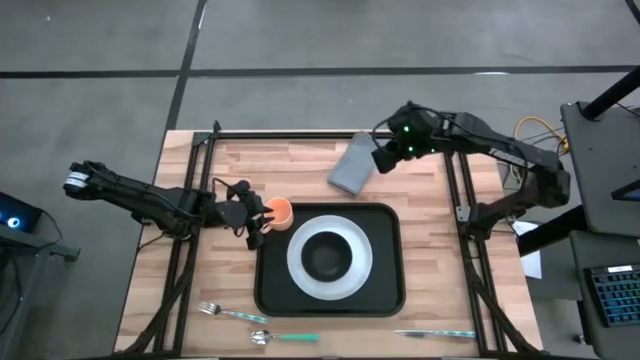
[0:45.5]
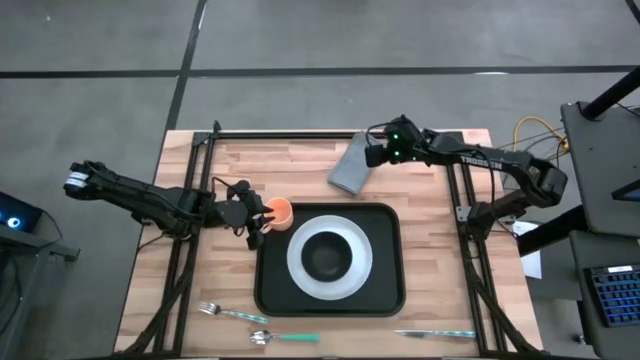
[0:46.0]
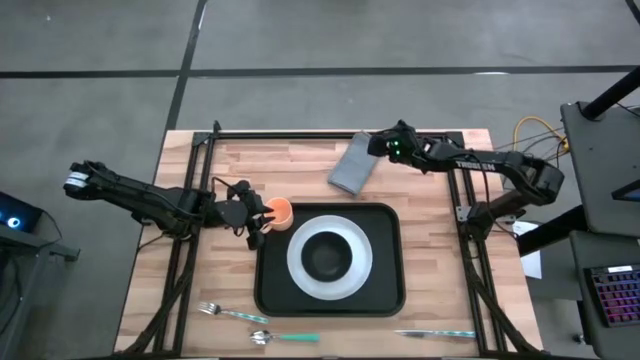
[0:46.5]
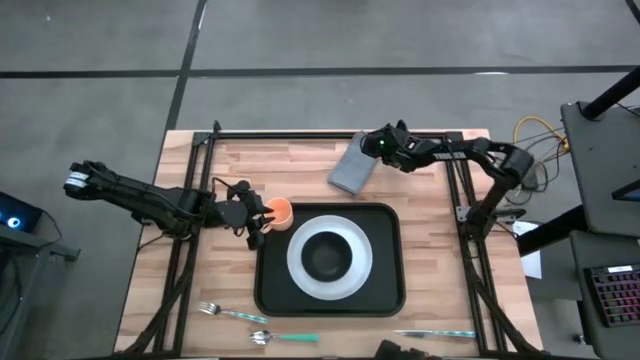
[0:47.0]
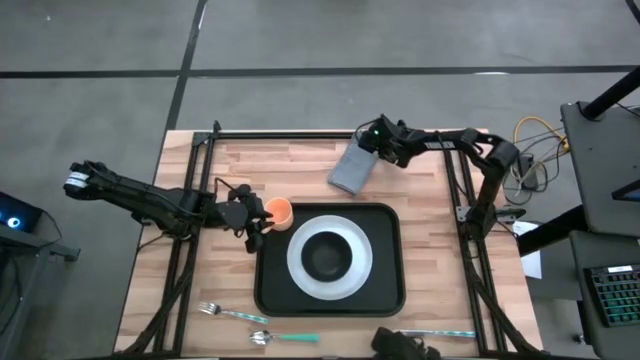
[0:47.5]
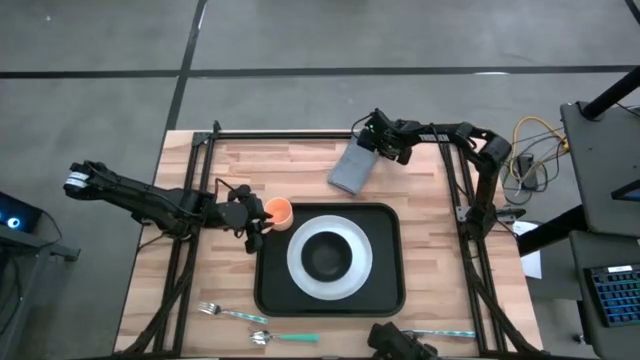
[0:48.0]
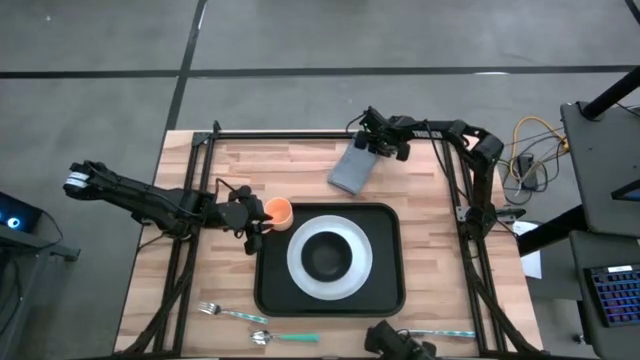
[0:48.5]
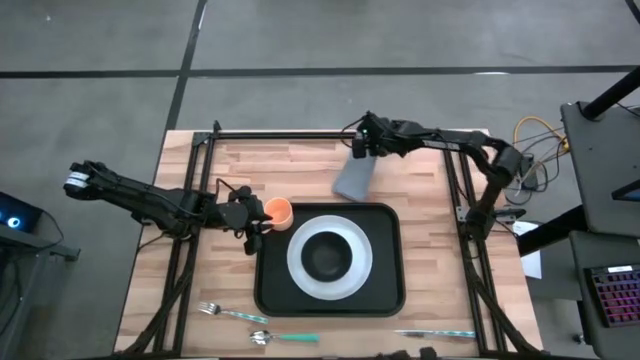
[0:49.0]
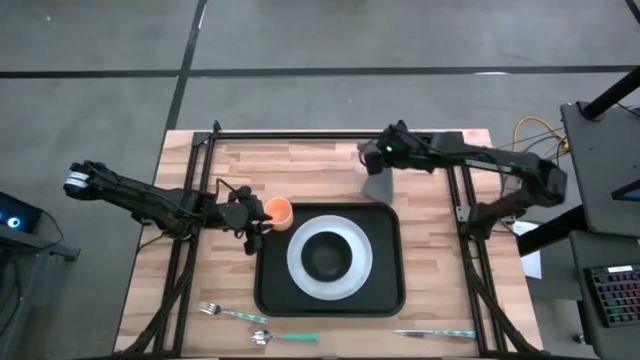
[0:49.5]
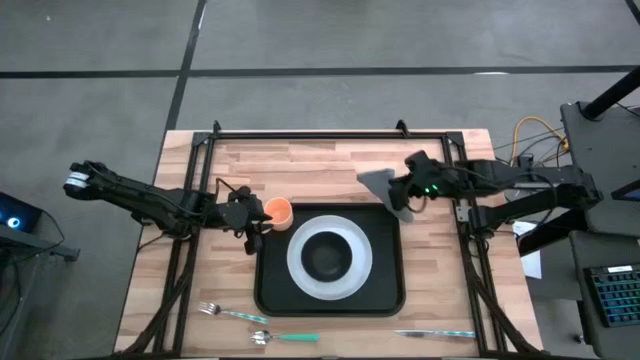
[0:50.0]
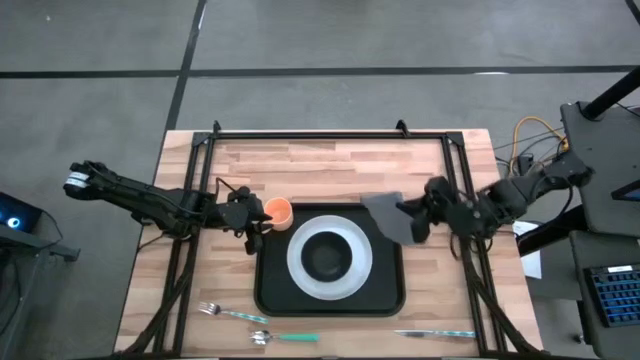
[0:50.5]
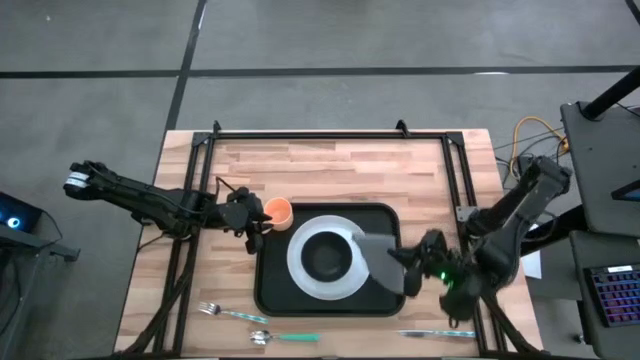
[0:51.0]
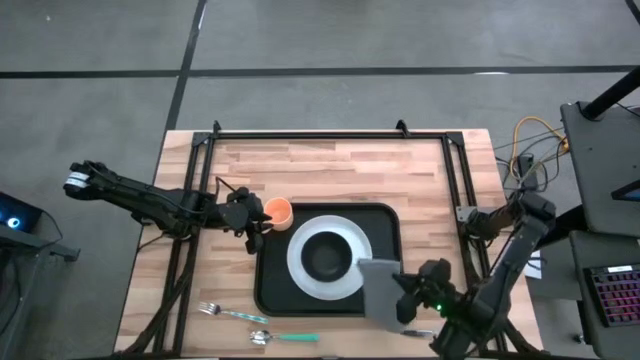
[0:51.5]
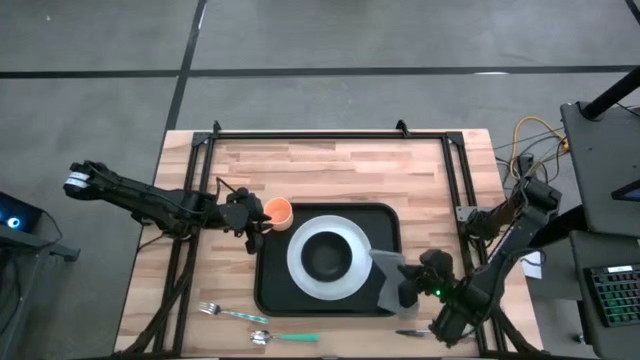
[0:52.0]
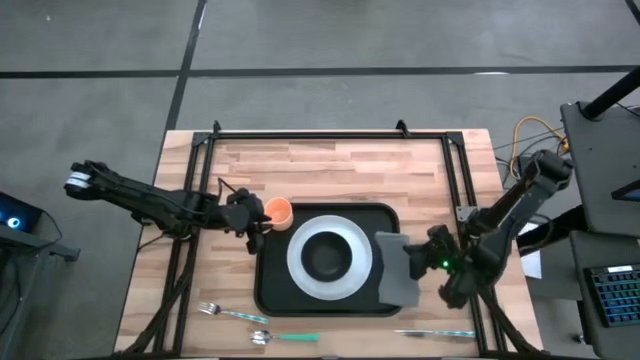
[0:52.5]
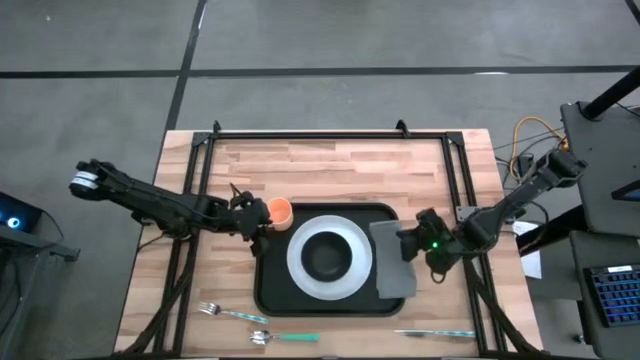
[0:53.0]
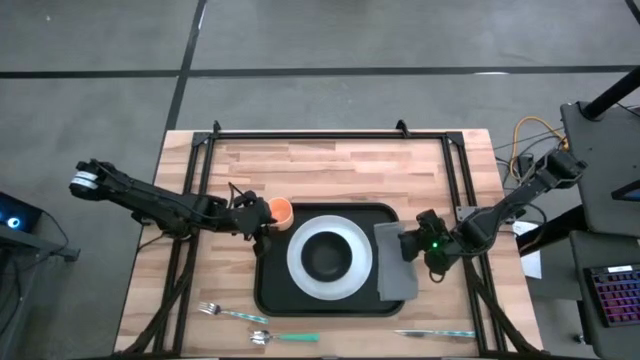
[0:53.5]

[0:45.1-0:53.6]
Task: Set up tray
Put the gray table napkin to the right of the white plate on the black serving tray

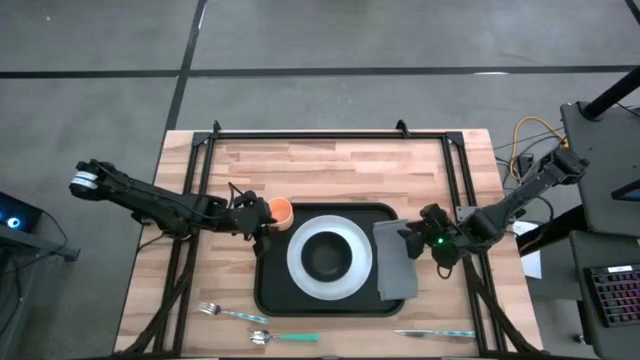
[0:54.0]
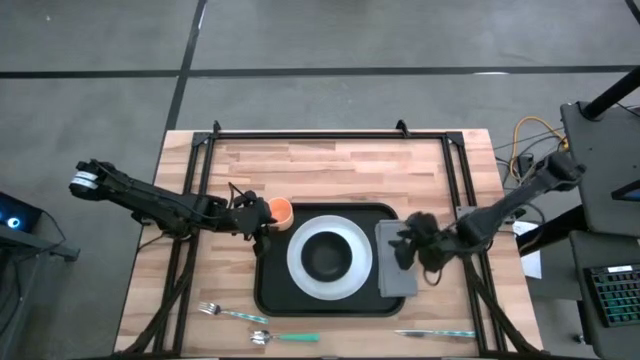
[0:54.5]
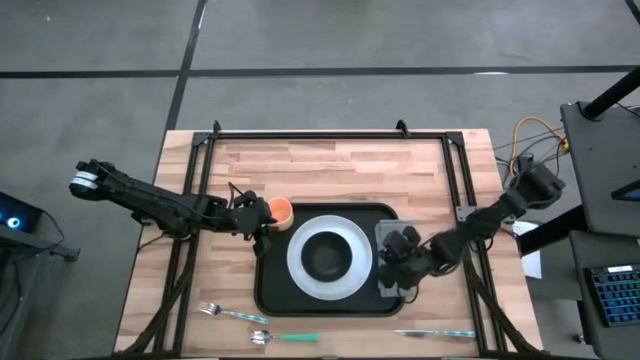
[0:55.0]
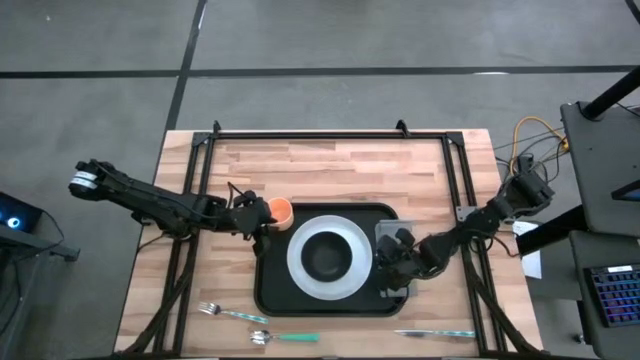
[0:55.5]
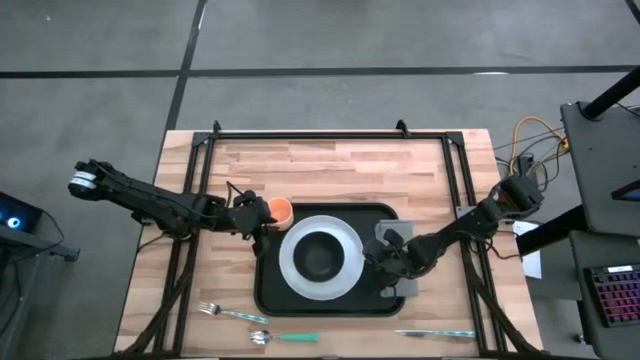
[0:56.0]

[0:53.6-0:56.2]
Adjust the white plate on the black serving tray

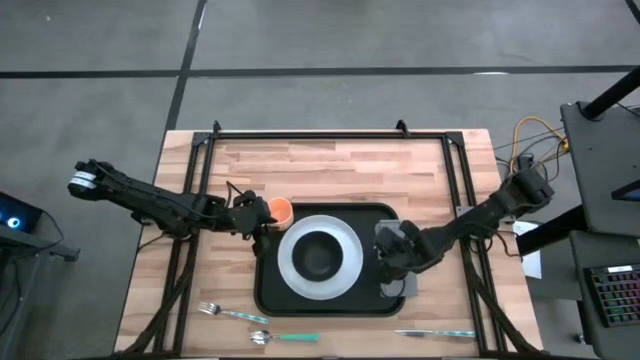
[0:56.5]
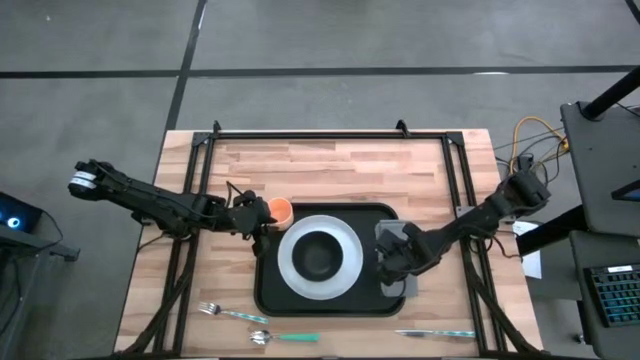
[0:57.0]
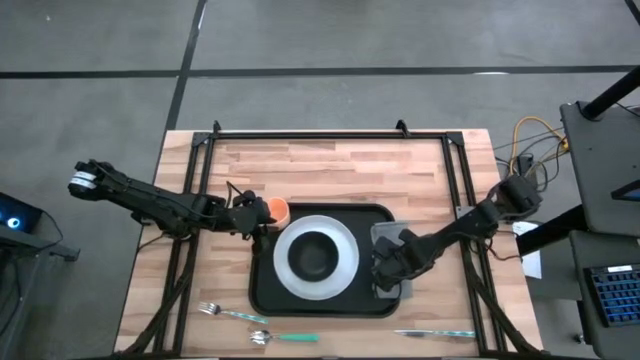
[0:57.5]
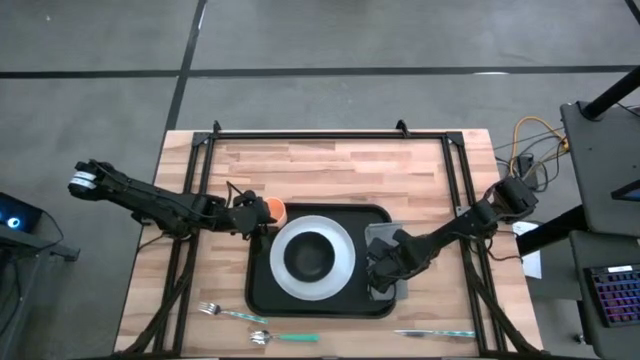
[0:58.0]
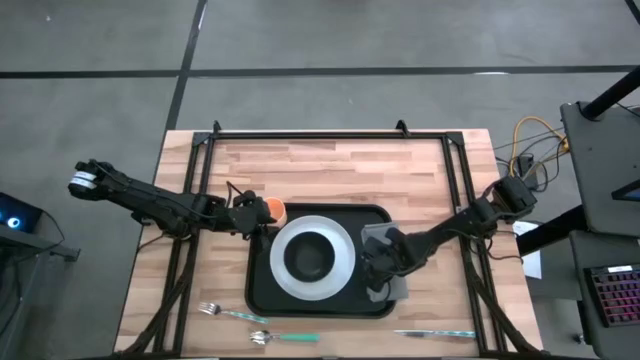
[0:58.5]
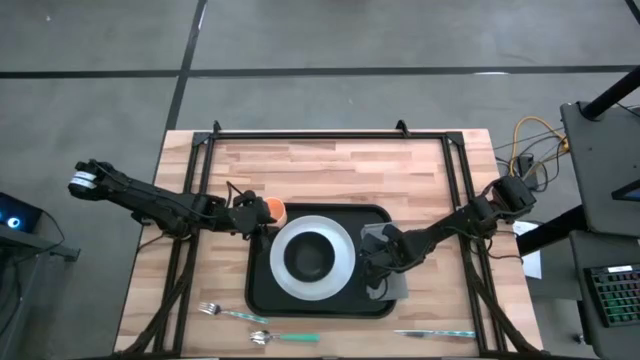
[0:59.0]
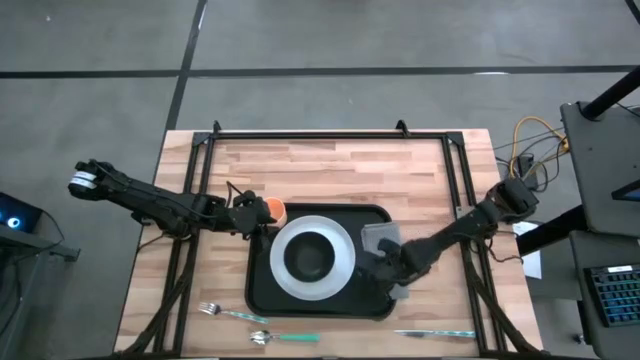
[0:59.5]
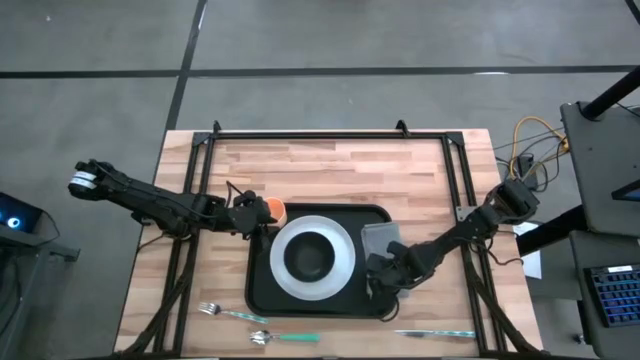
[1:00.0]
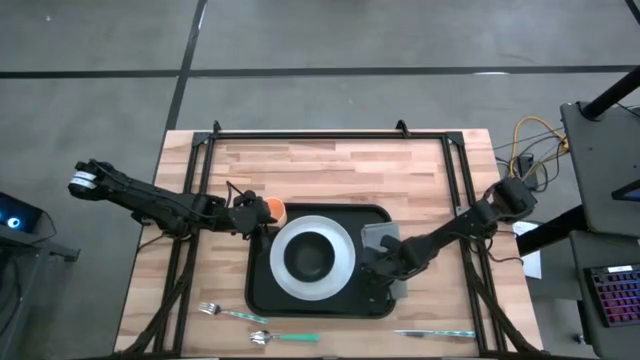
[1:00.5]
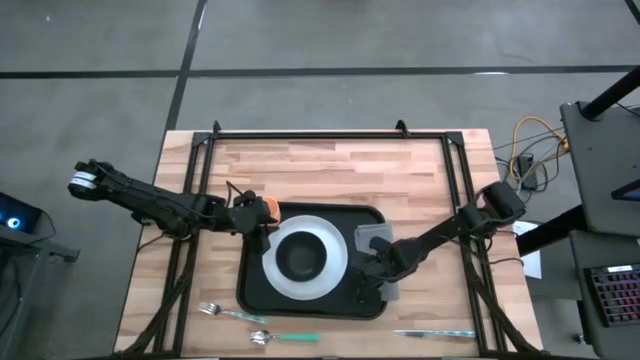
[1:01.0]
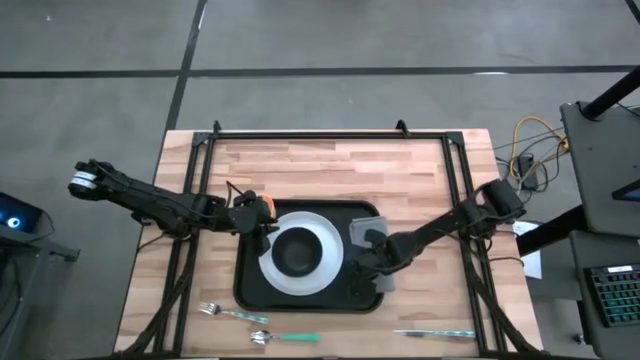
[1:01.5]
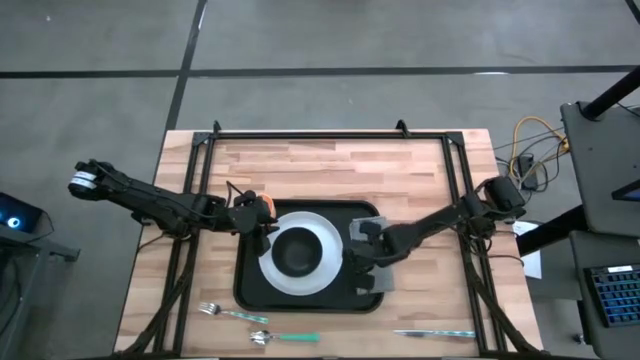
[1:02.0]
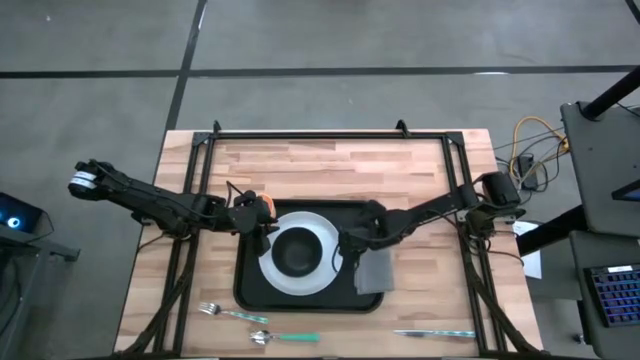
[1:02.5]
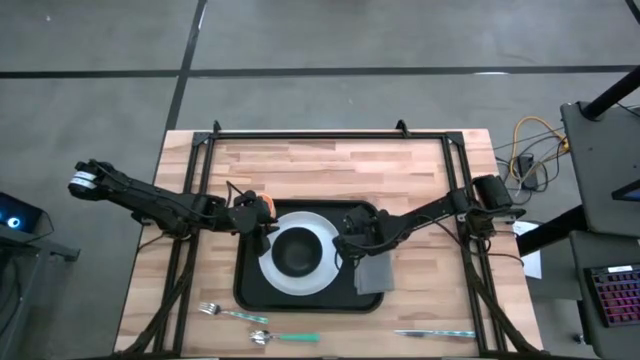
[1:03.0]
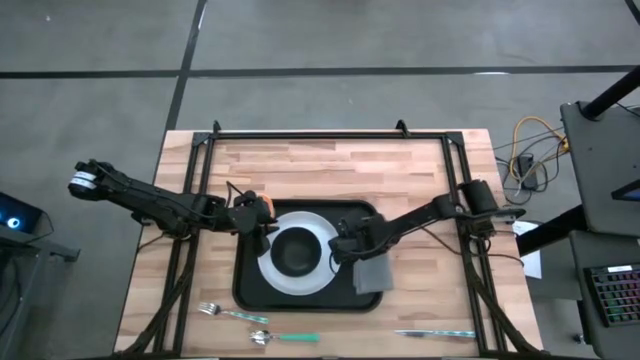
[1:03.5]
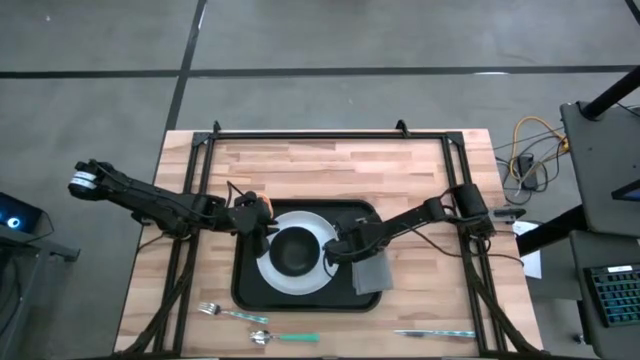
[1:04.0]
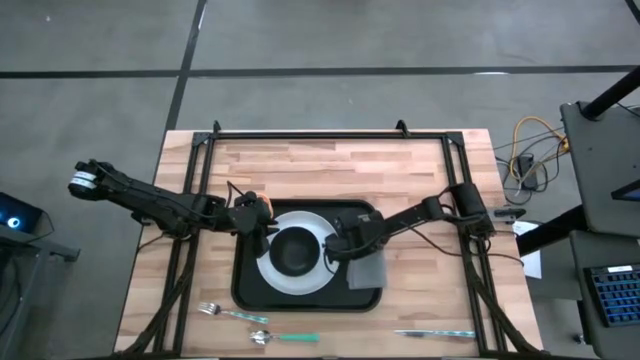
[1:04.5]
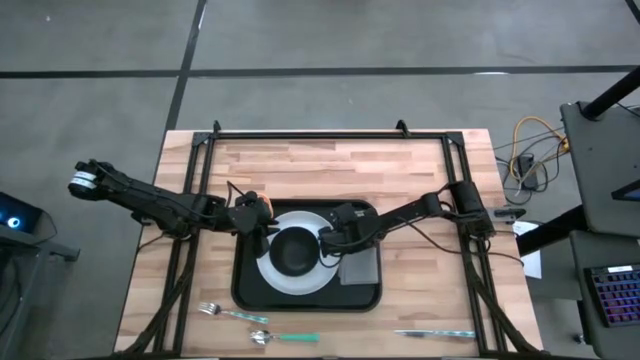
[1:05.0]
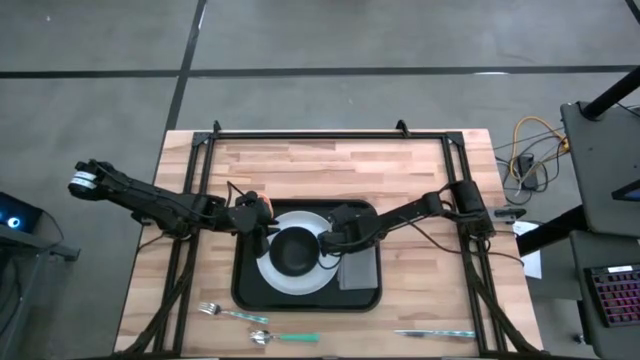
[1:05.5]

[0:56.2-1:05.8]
Adjust the gray table napkin on the black serving tray
